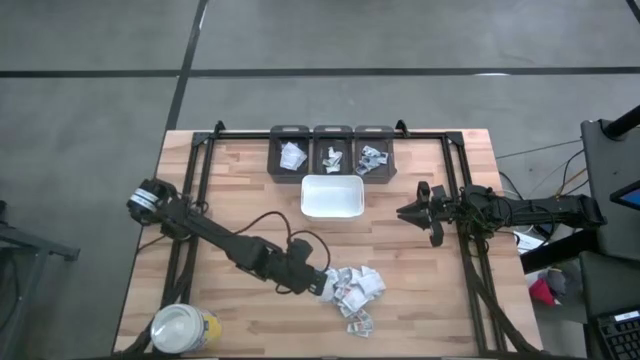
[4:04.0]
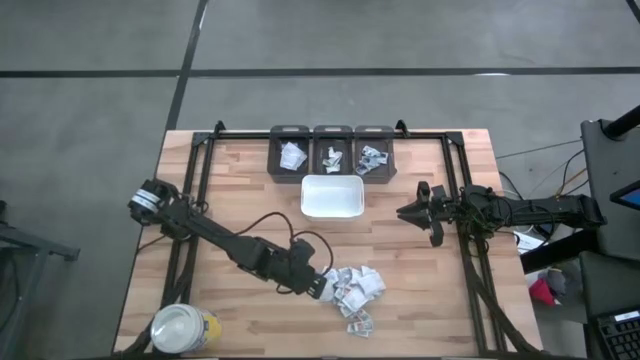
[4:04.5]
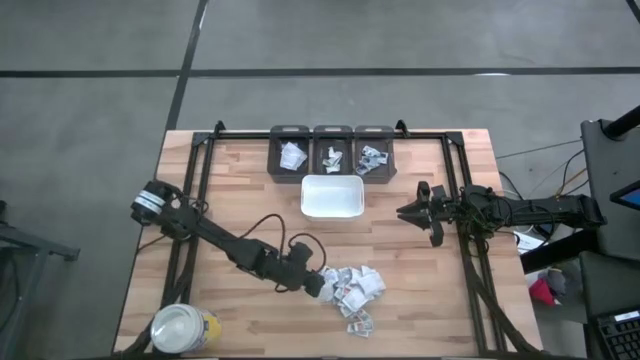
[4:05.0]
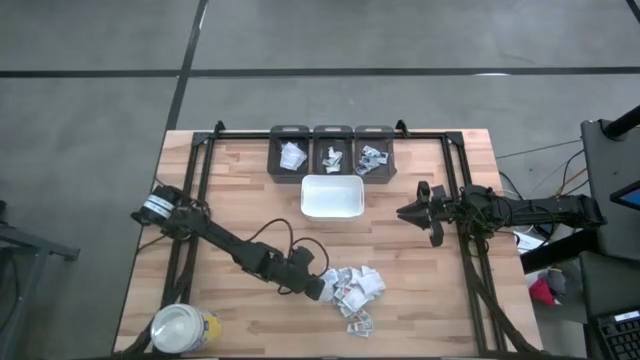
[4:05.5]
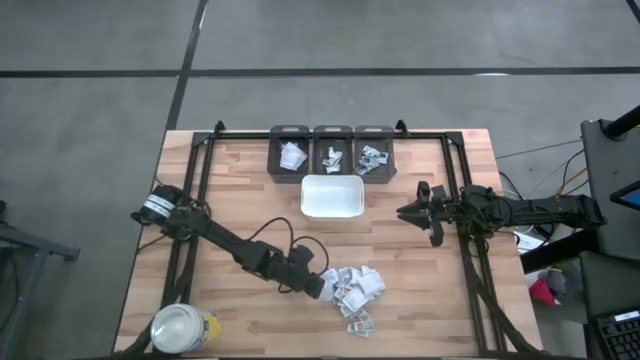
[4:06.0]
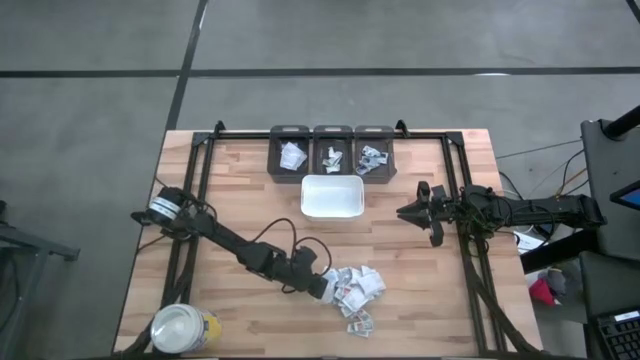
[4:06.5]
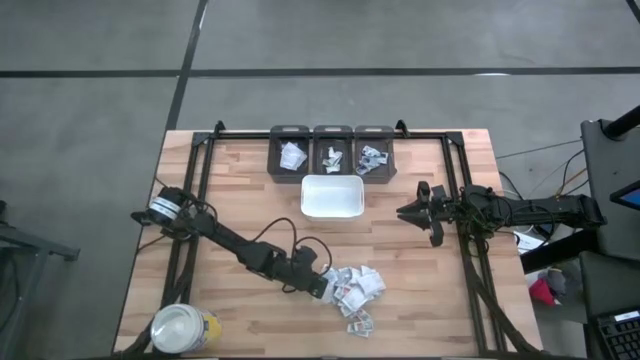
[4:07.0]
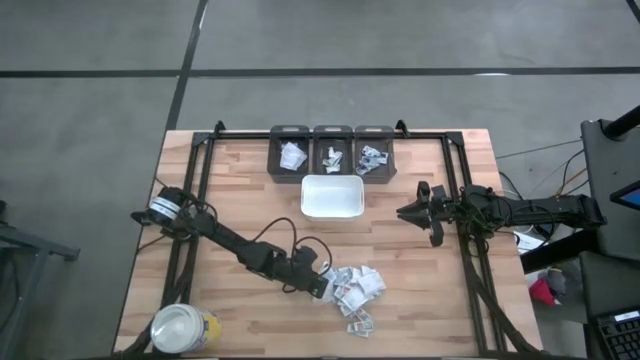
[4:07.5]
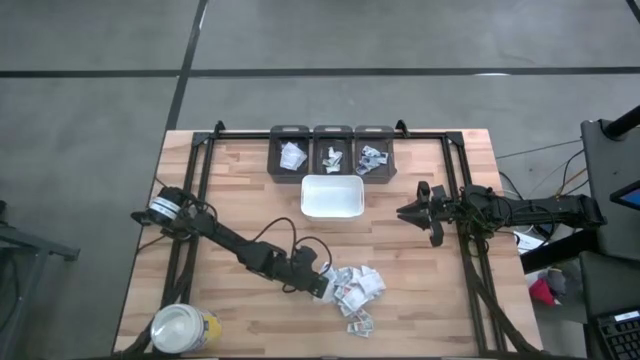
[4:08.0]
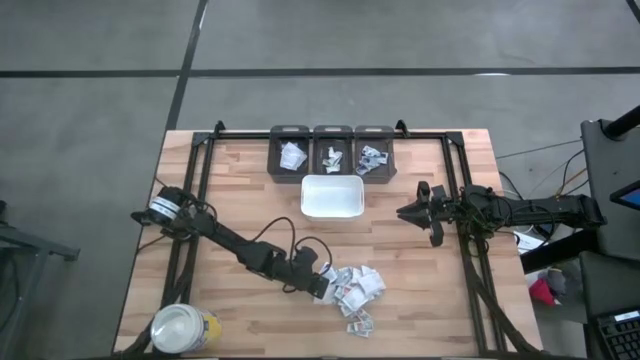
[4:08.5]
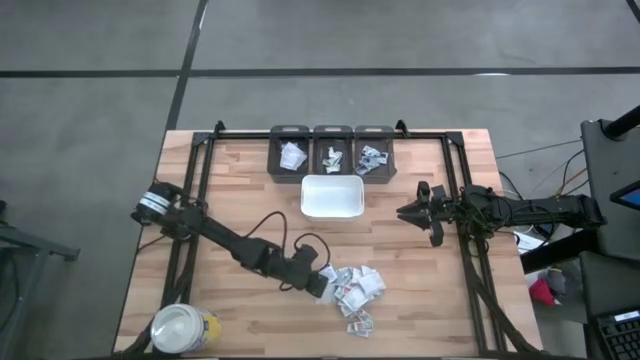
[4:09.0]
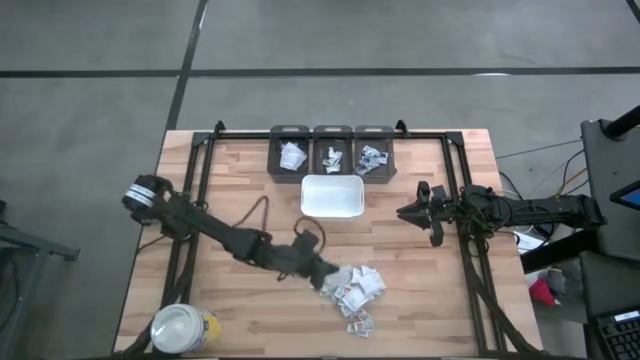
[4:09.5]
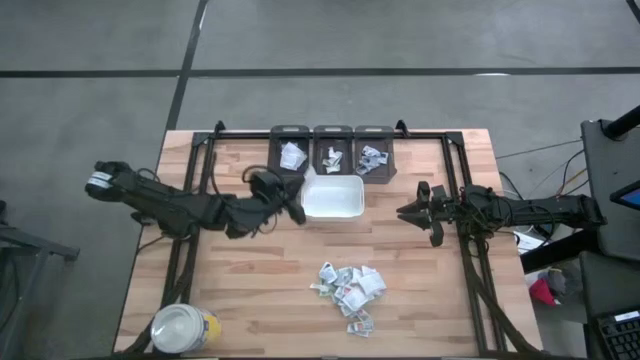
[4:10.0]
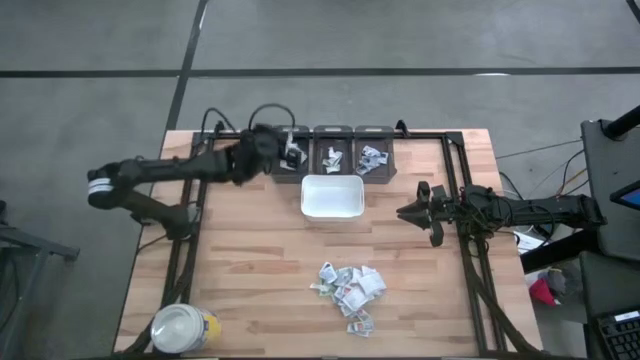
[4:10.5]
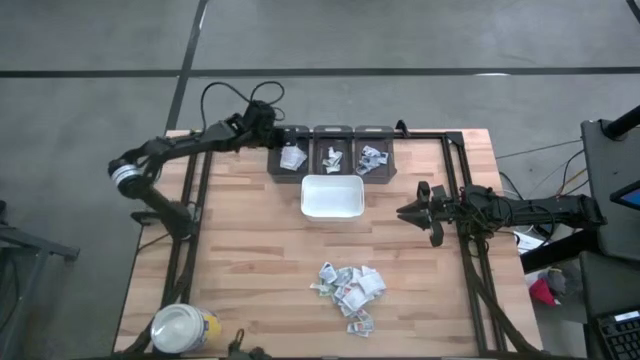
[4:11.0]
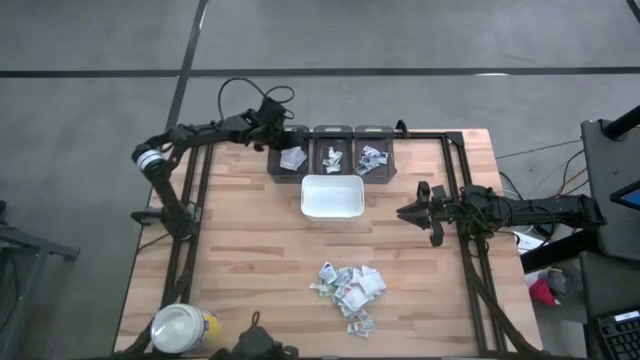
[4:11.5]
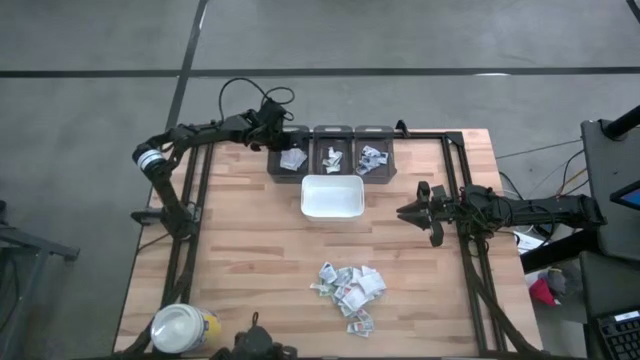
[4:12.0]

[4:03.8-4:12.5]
Task: Pick & Place First Aid Supplies
Put the white fingertip band aid into the left black bin

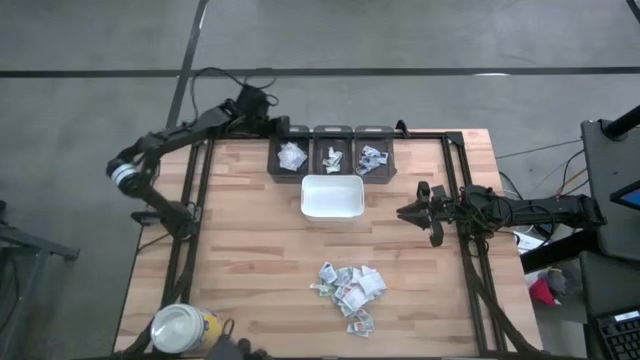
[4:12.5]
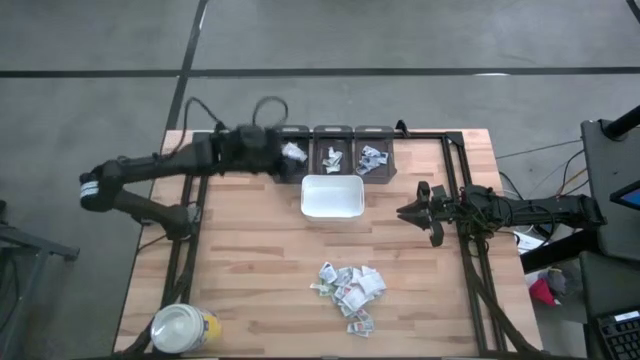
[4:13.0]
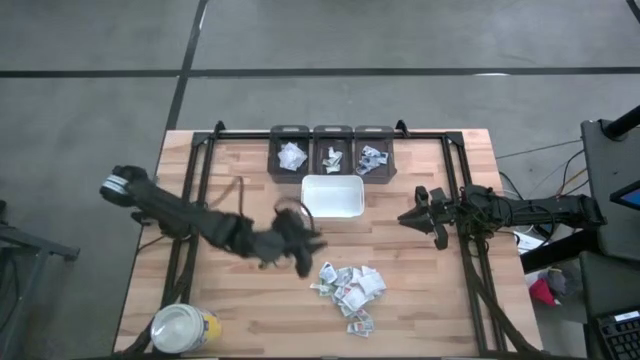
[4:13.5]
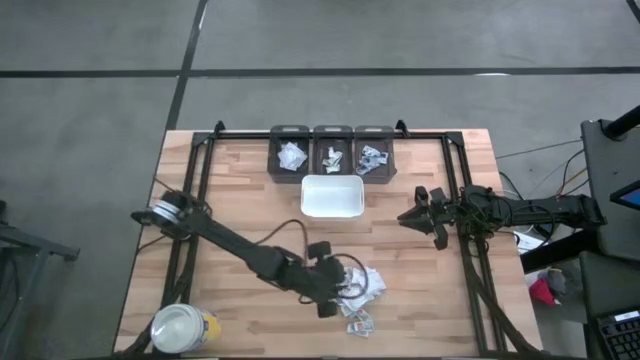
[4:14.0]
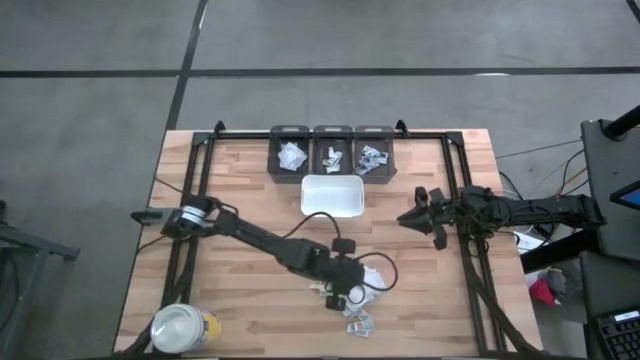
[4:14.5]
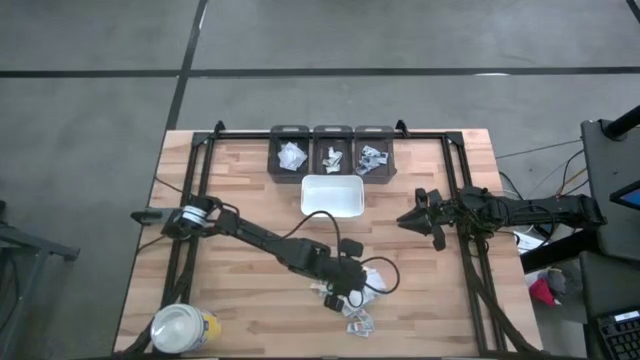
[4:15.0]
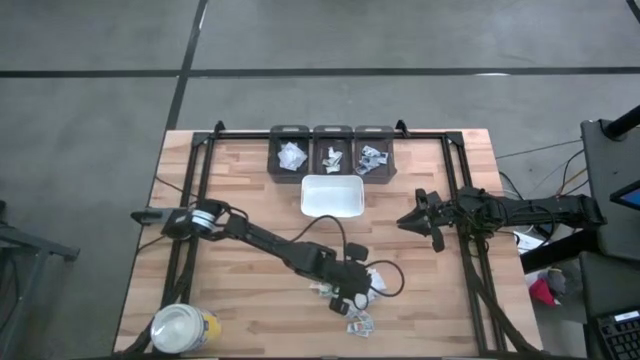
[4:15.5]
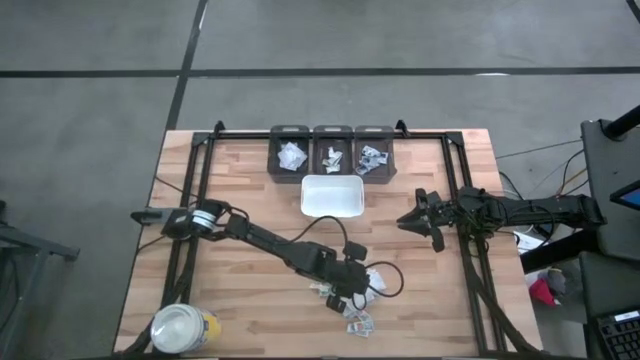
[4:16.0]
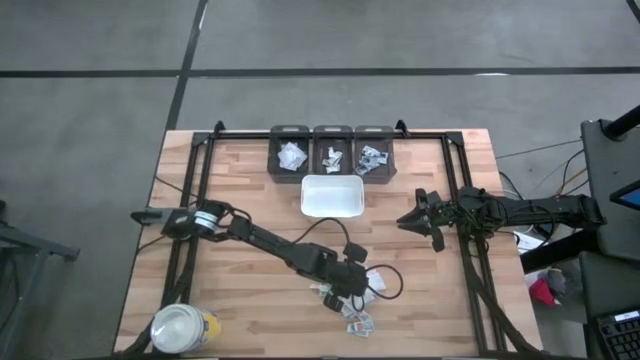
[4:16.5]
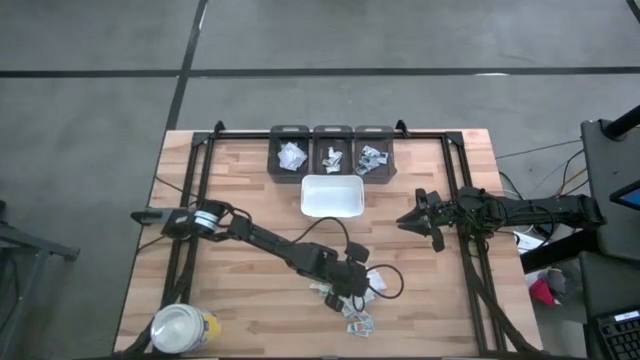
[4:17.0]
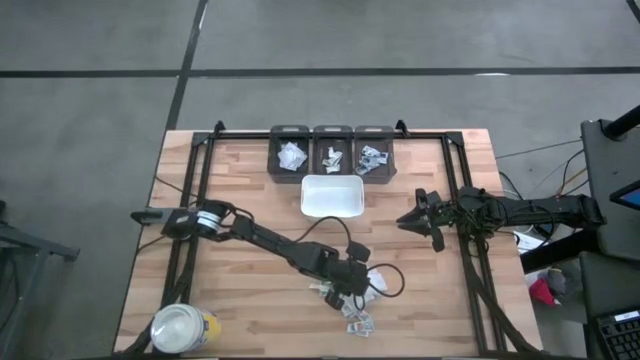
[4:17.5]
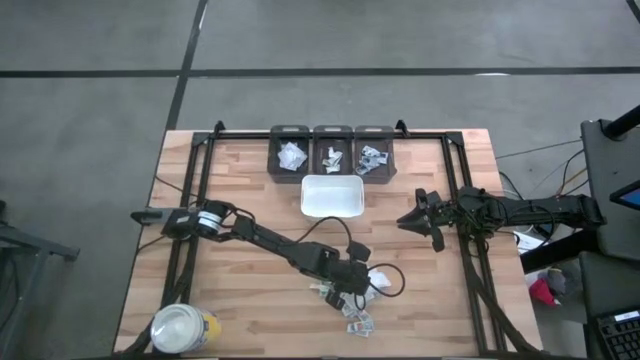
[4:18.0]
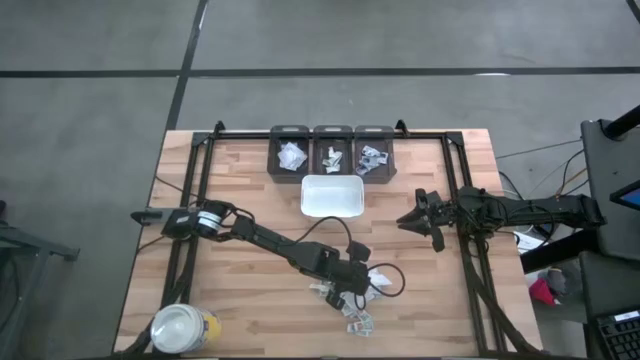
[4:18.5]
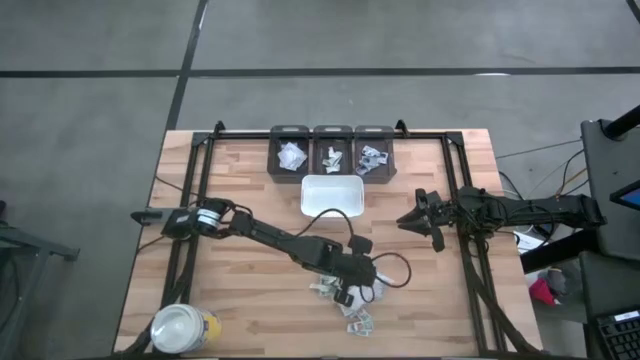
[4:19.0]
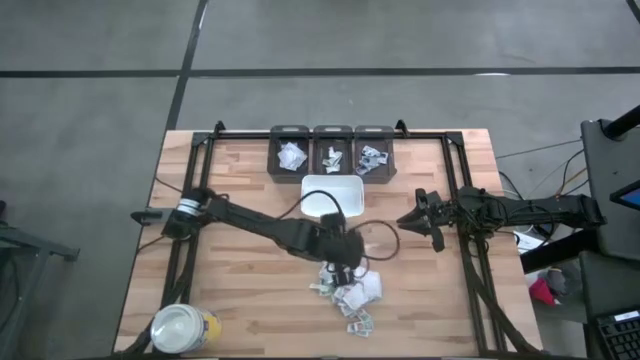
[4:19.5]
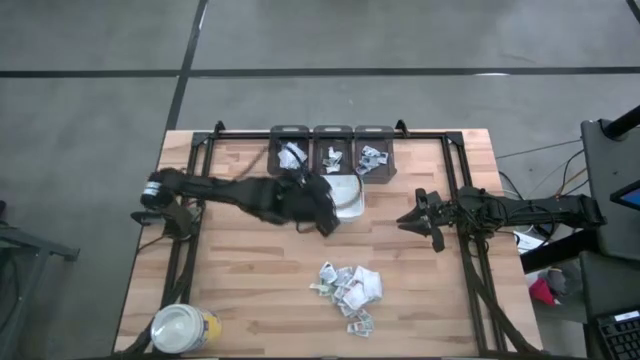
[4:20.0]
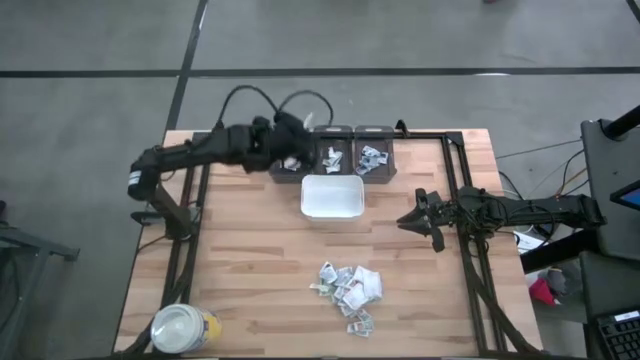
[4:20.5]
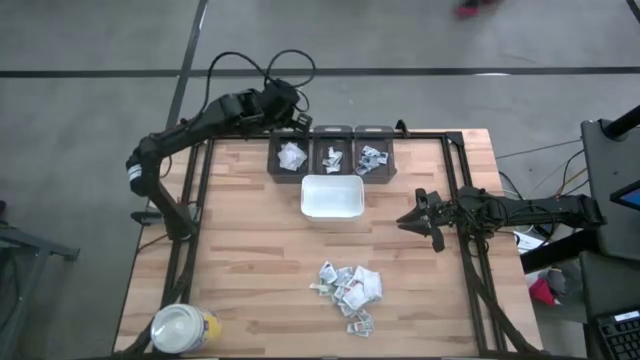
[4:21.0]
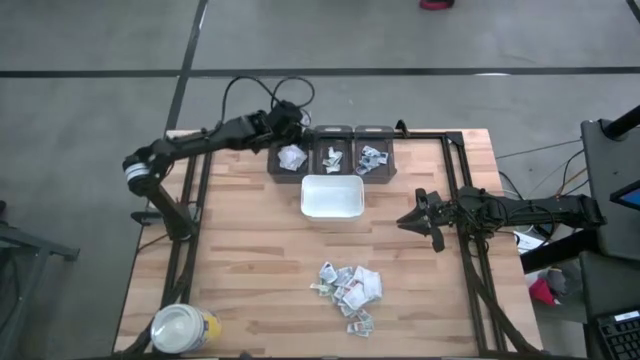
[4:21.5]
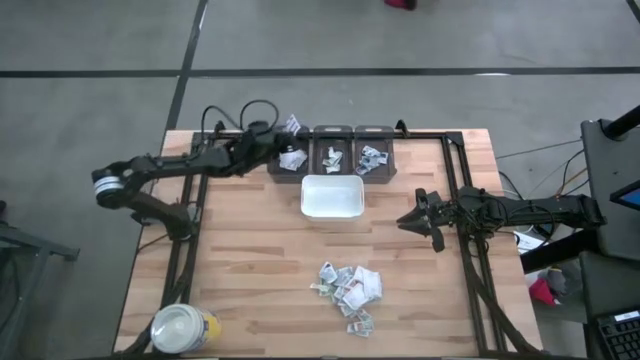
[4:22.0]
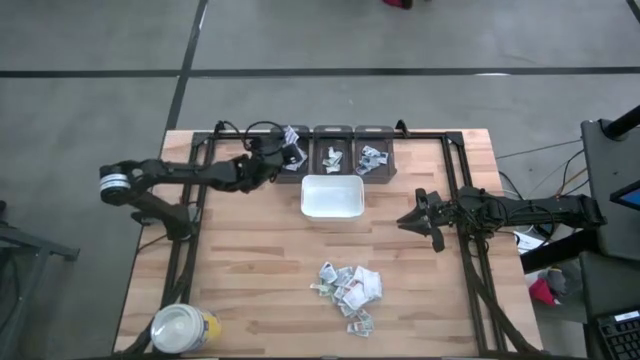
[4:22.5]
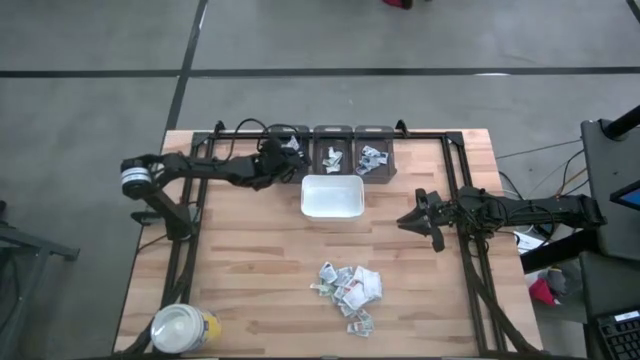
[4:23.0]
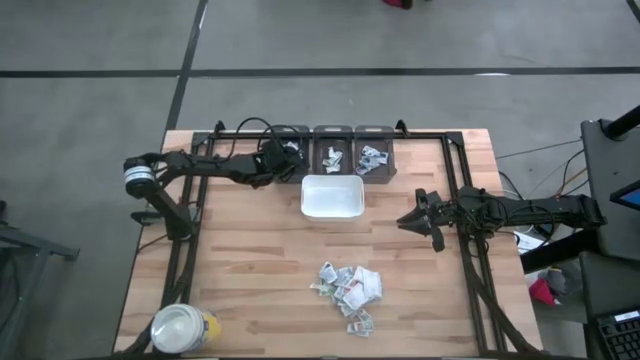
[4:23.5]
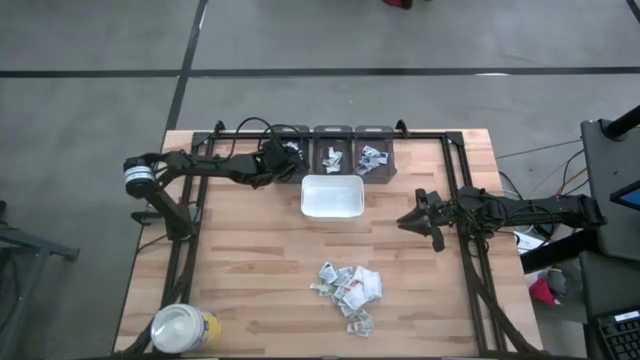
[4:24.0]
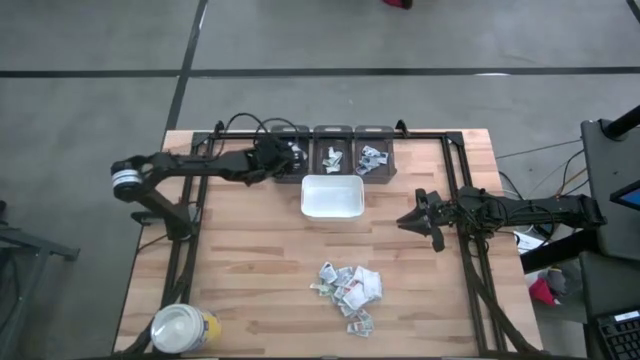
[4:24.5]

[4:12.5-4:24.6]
Put the white fingertip band aid into the left black bin
